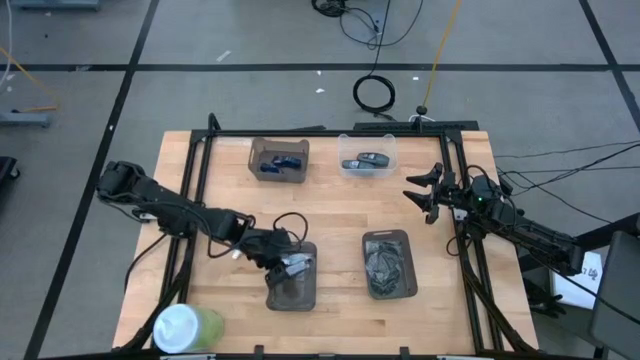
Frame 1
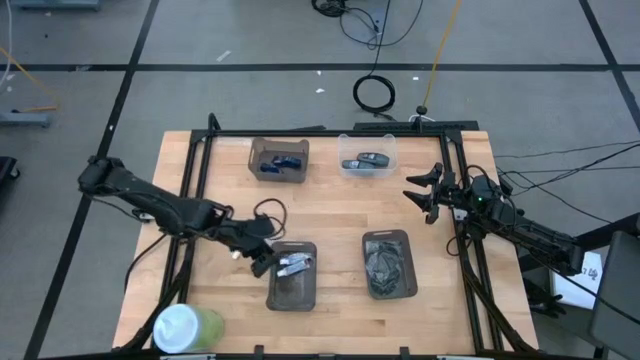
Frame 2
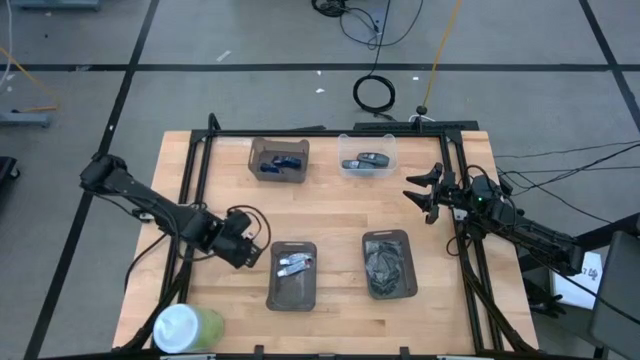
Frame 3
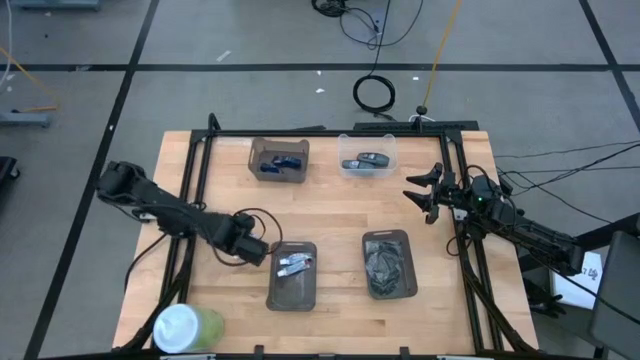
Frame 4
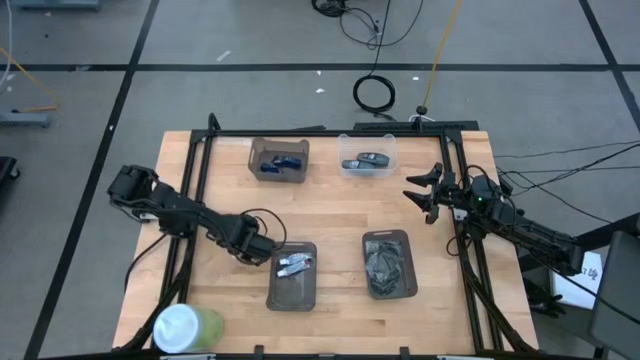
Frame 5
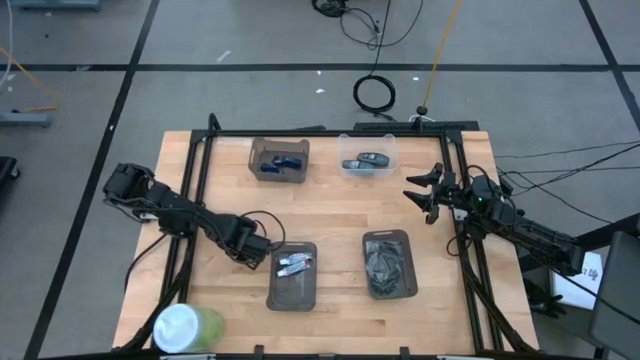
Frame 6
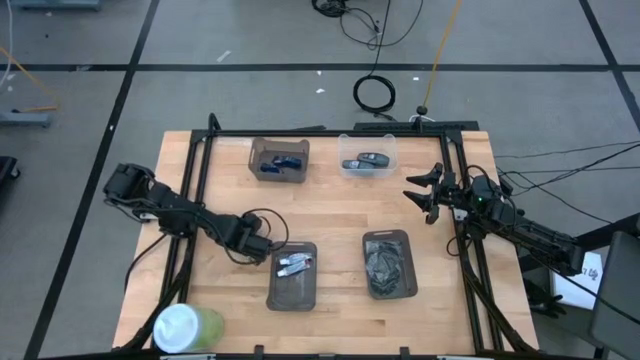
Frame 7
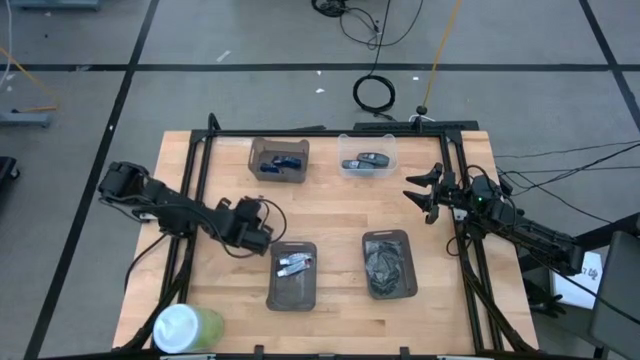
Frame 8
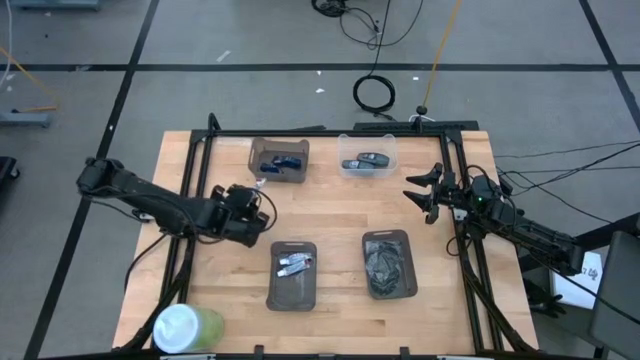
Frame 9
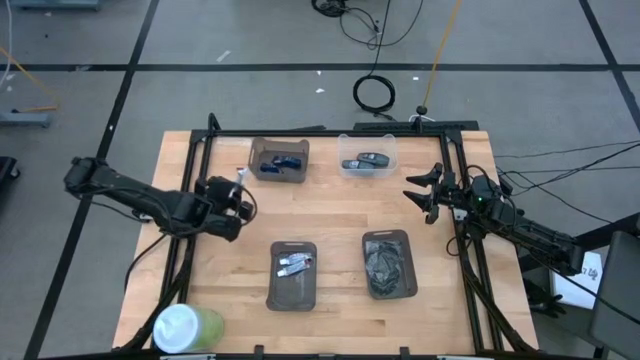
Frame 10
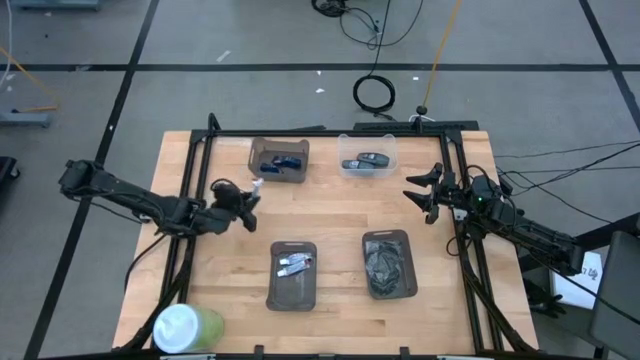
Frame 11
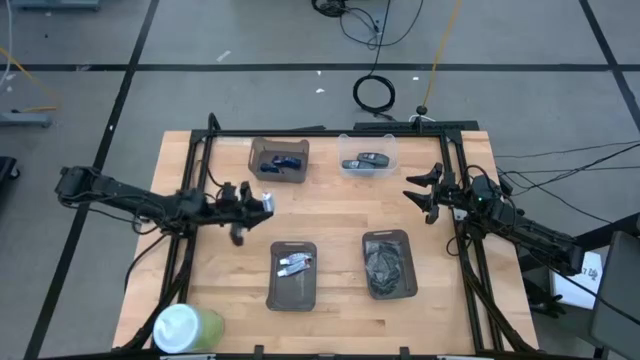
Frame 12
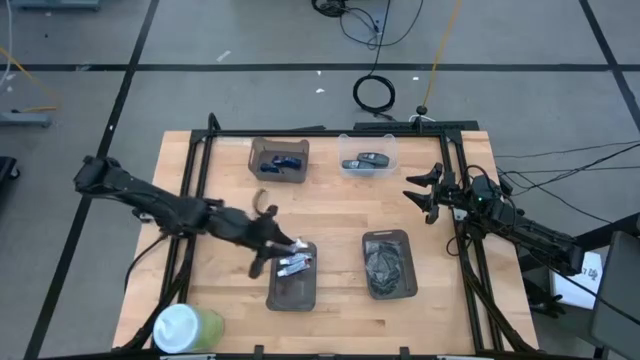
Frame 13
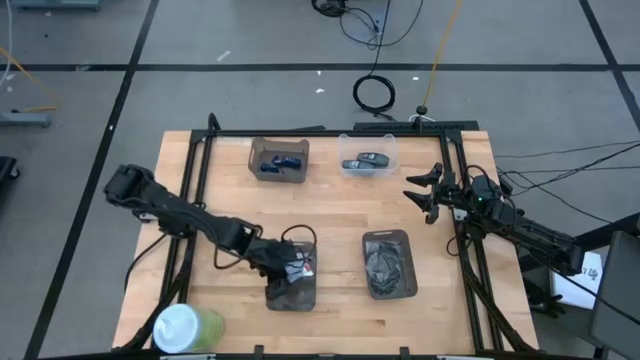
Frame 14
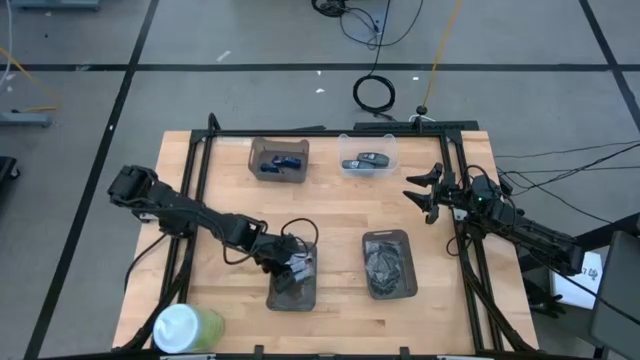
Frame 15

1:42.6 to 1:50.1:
Task: Pick & Place Travel size toiletries
Put the white toothpaste into the bottom left black bin

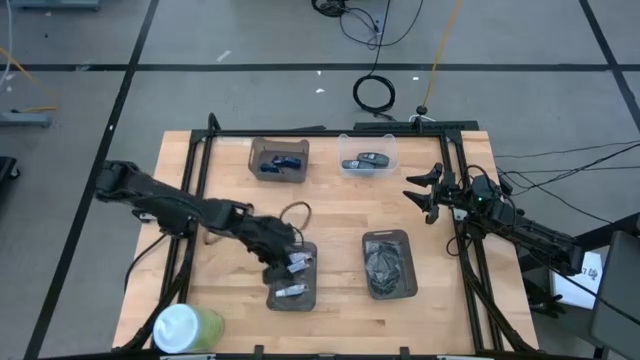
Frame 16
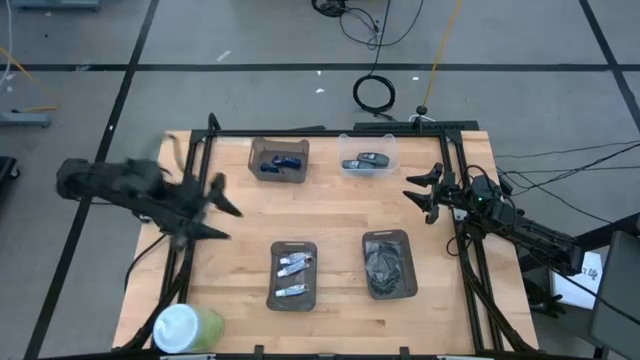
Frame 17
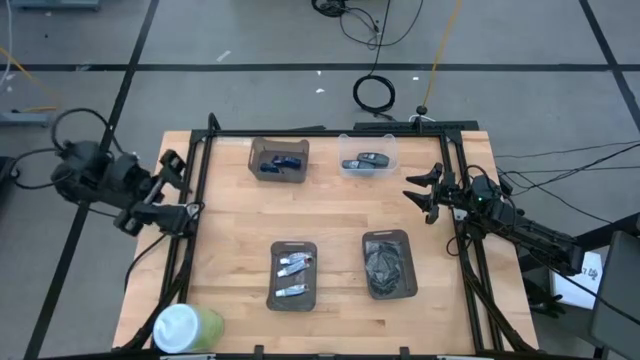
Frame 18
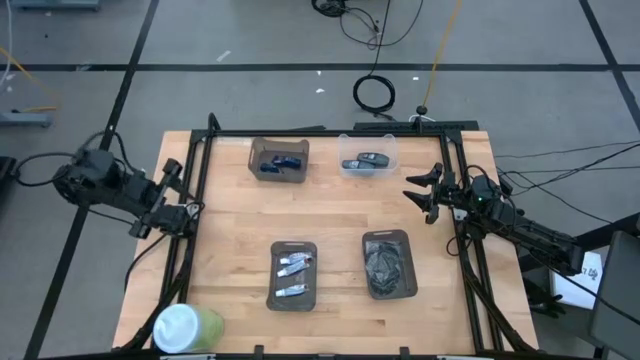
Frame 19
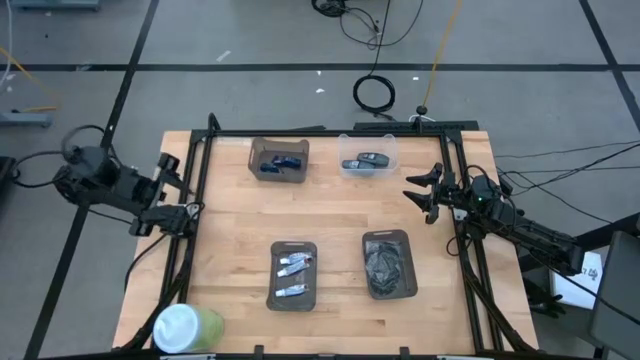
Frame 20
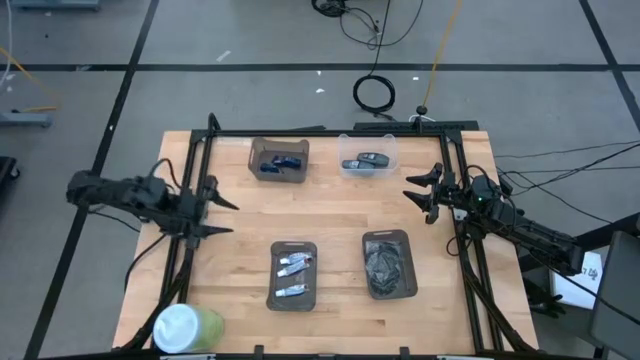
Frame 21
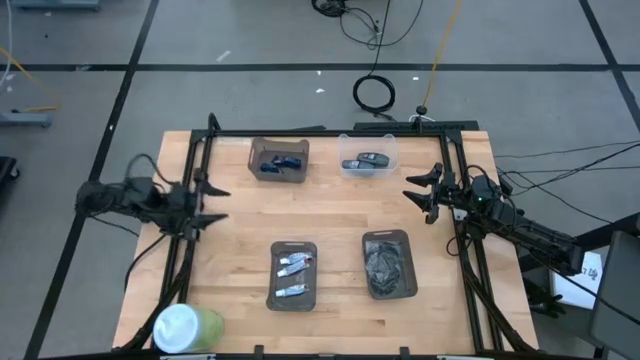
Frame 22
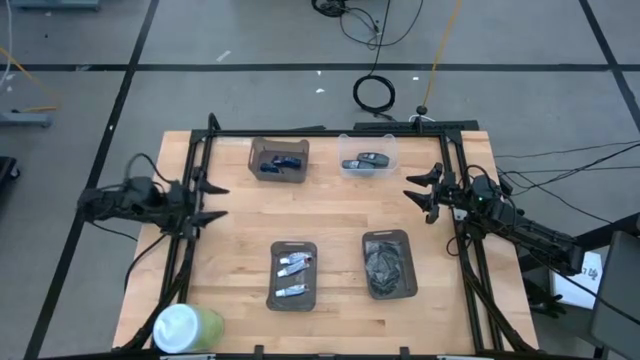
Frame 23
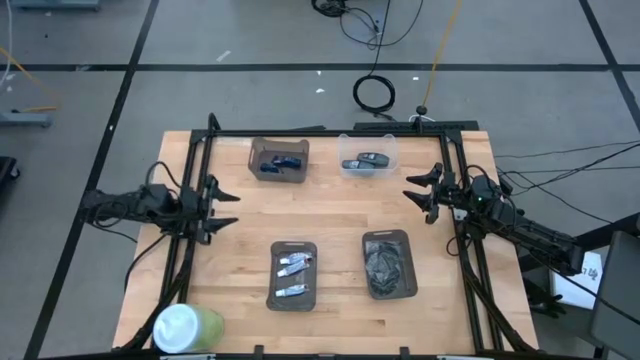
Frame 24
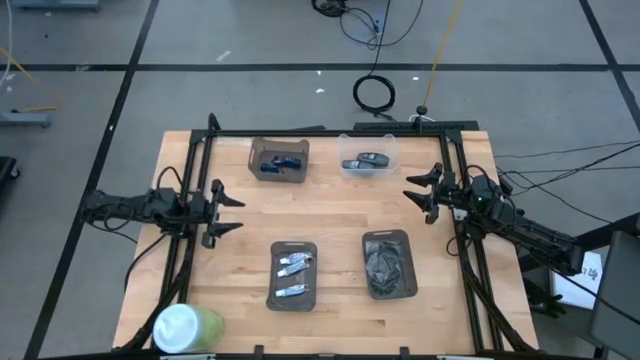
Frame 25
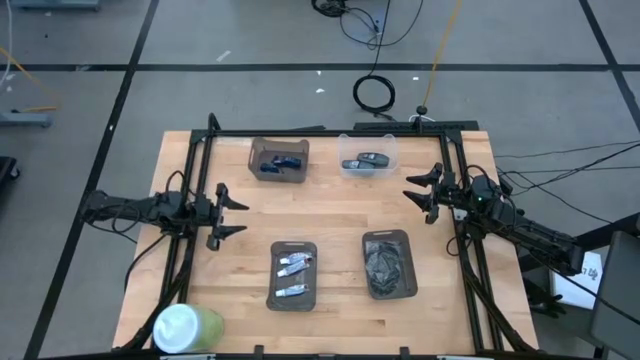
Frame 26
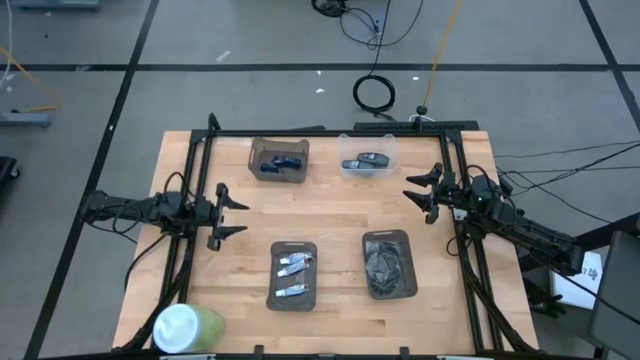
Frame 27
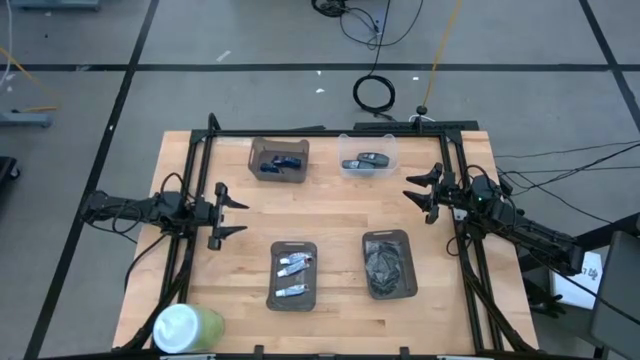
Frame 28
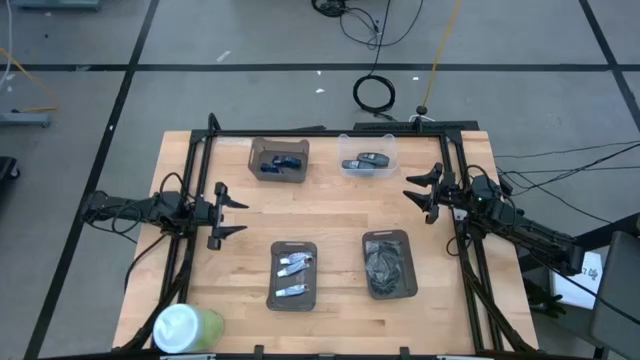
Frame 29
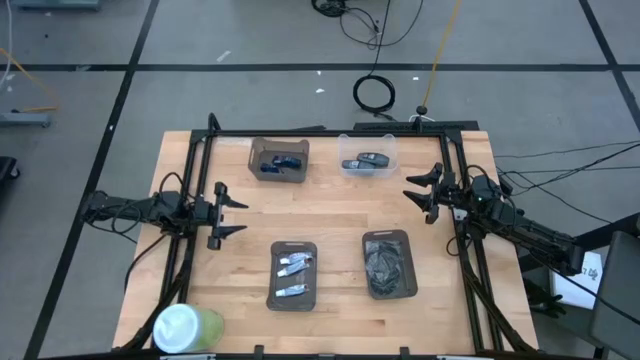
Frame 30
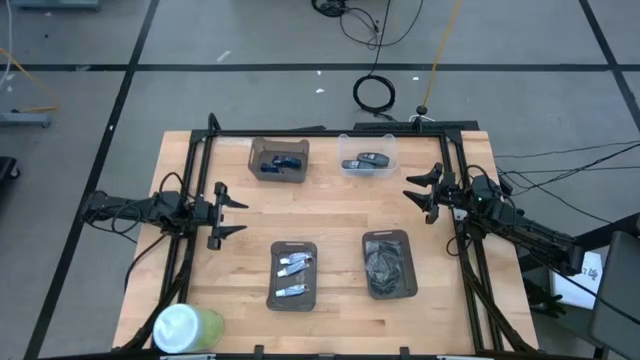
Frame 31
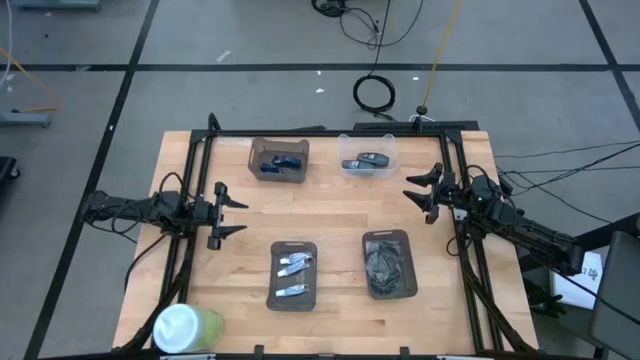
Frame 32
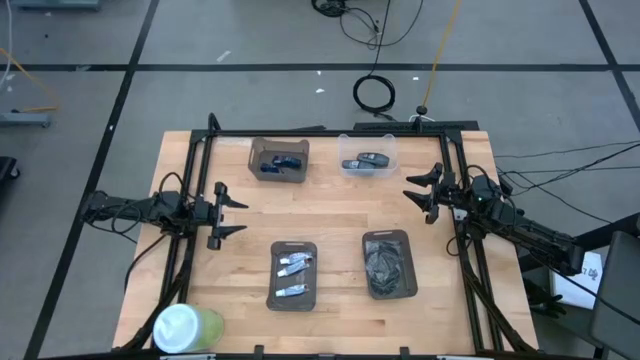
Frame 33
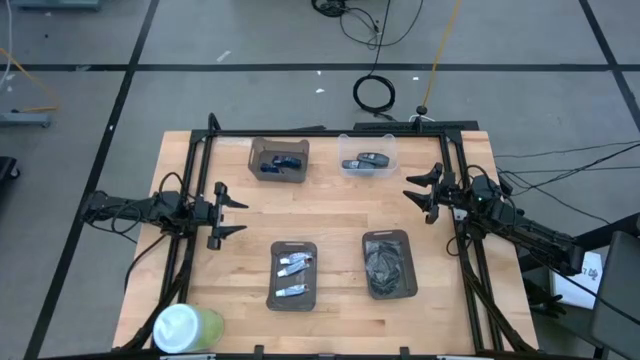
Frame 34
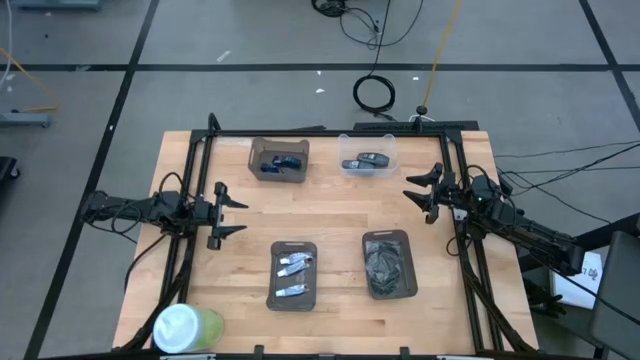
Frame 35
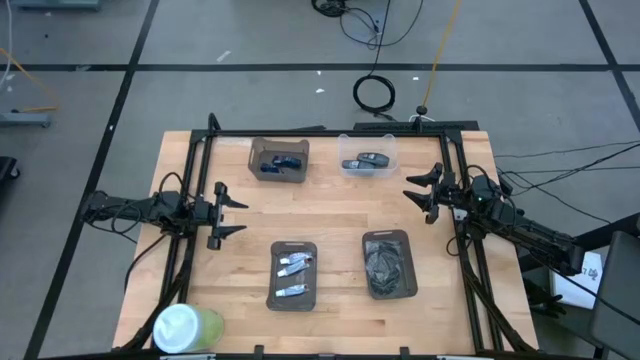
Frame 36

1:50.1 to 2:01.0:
Return to Home Position

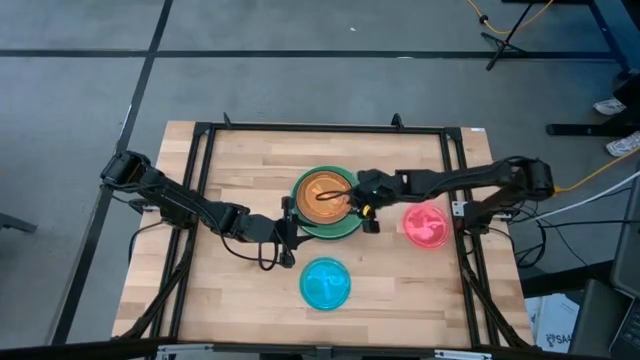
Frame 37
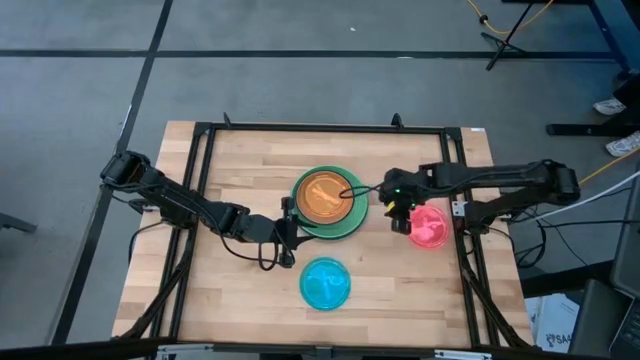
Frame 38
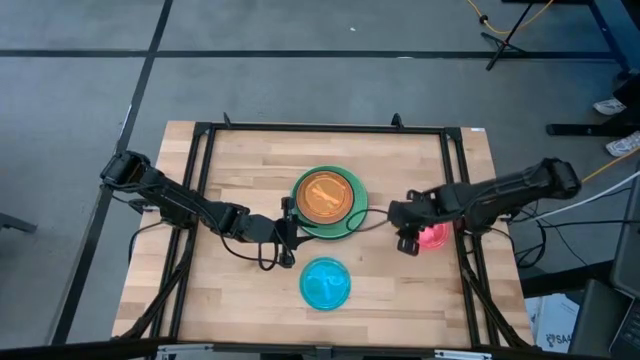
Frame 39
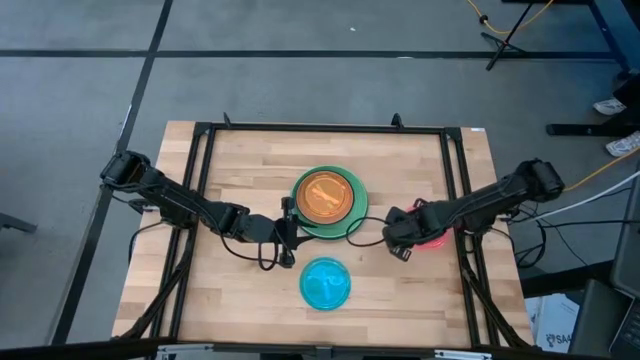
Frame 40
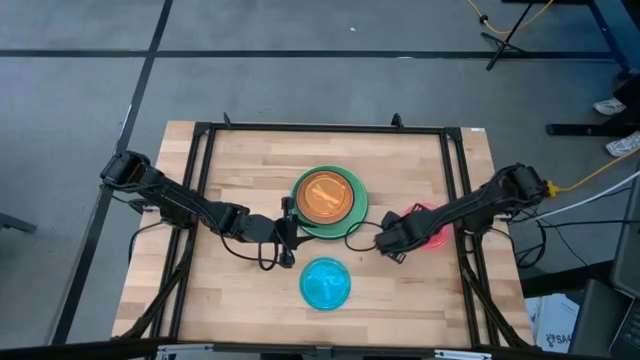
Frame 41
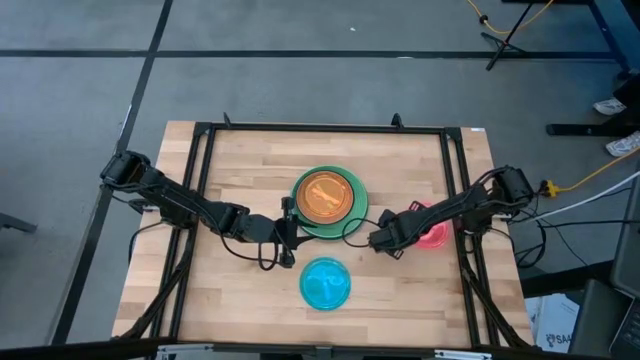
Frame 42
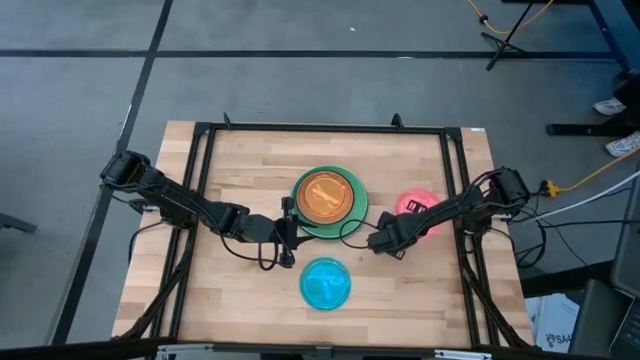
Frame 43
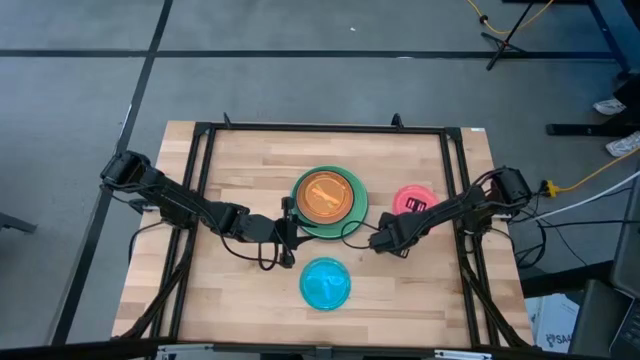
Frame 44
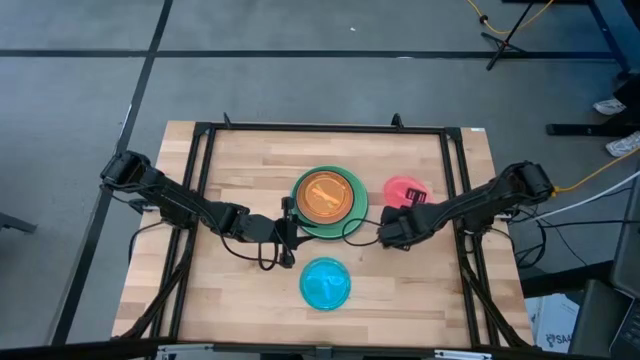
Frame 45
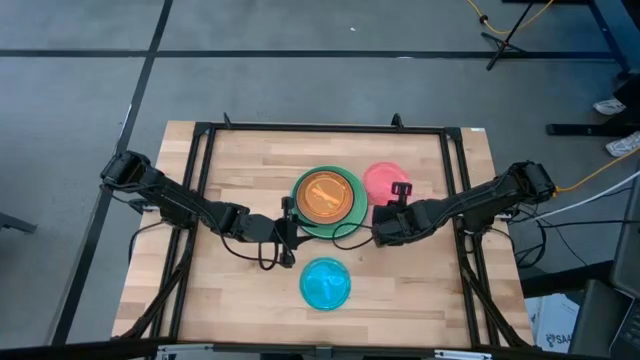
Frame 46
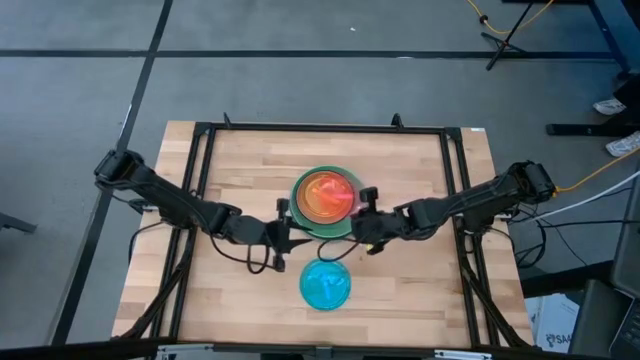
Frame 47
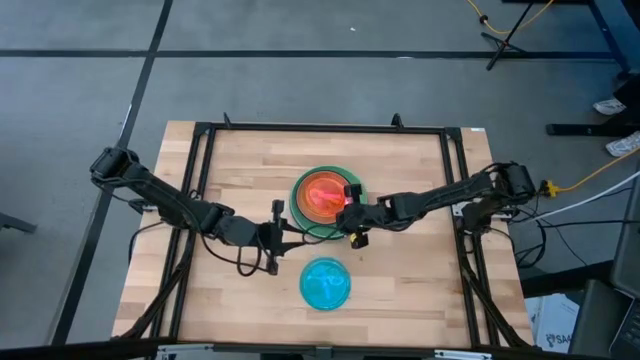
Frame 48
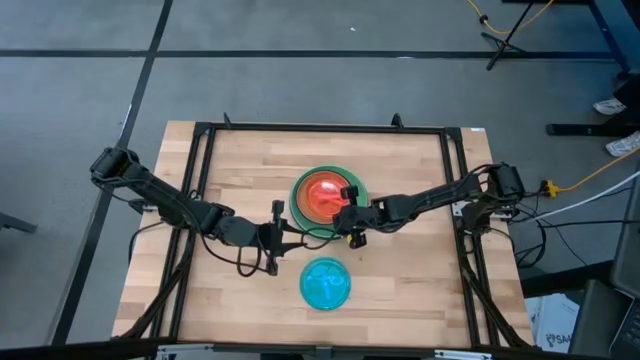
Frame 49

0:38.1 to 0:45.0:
Task: Stack plastic plates
Stack the light pink plate on top of the light orange plate
